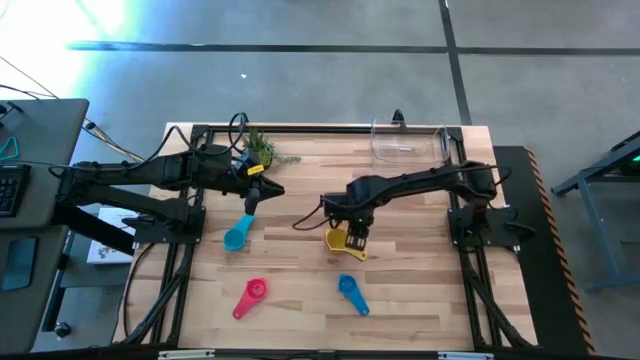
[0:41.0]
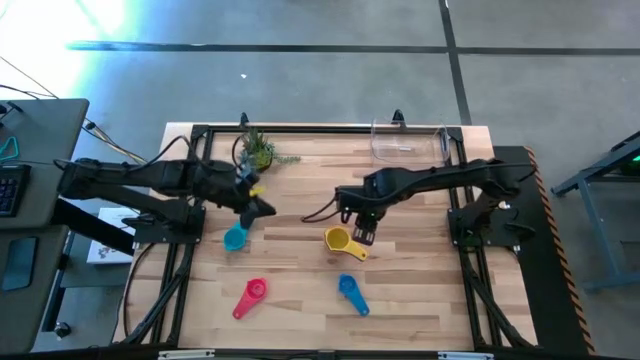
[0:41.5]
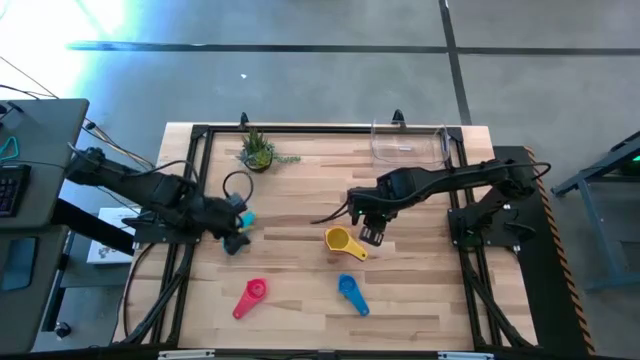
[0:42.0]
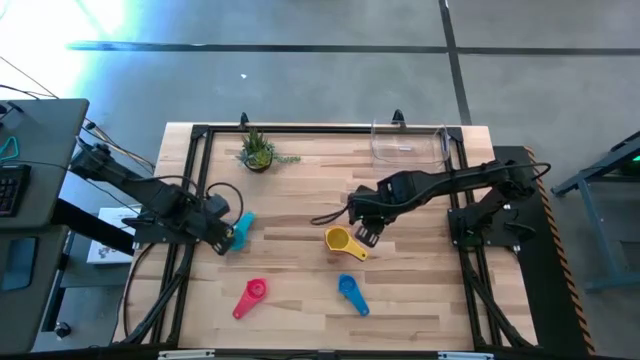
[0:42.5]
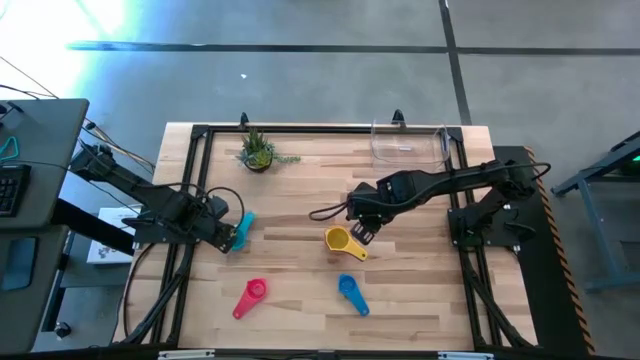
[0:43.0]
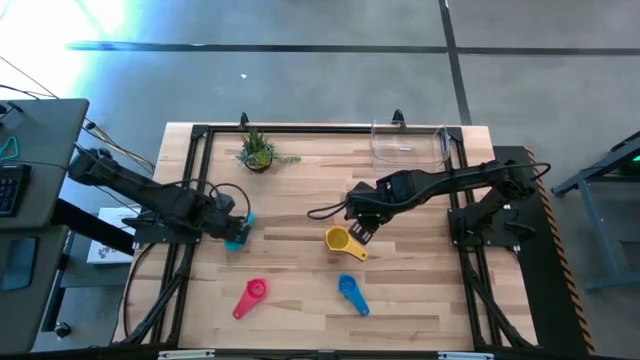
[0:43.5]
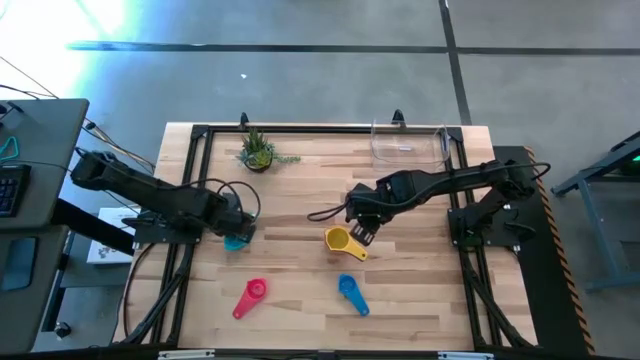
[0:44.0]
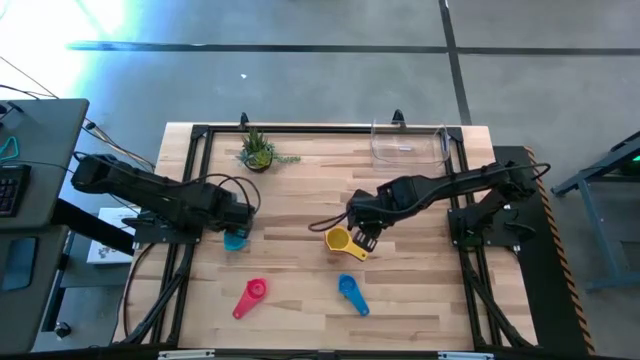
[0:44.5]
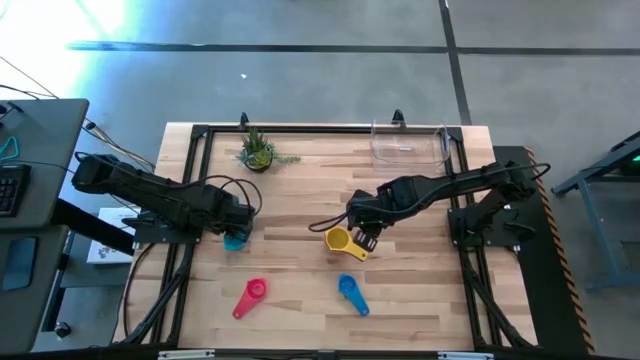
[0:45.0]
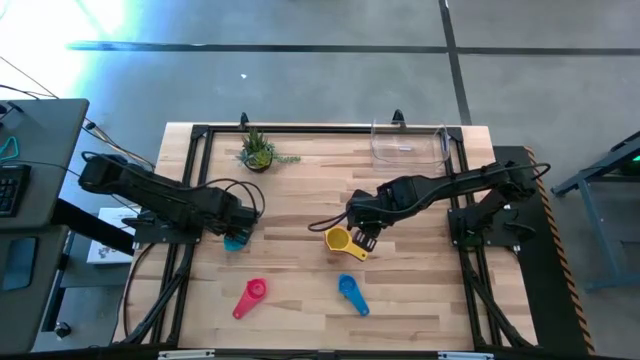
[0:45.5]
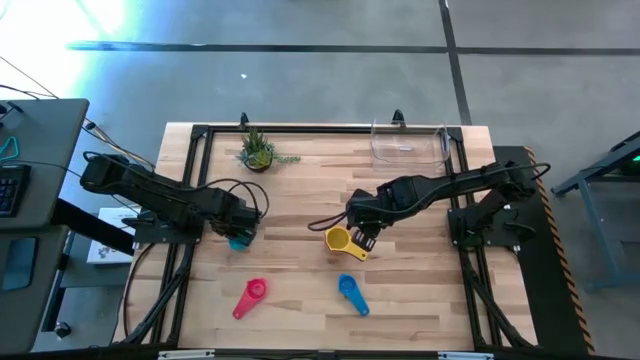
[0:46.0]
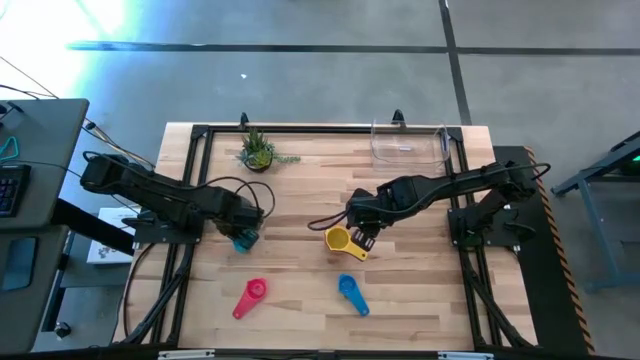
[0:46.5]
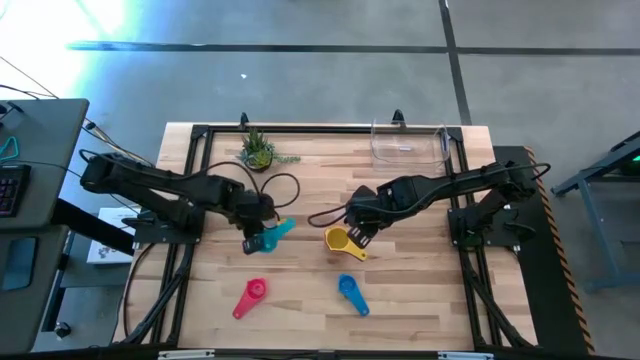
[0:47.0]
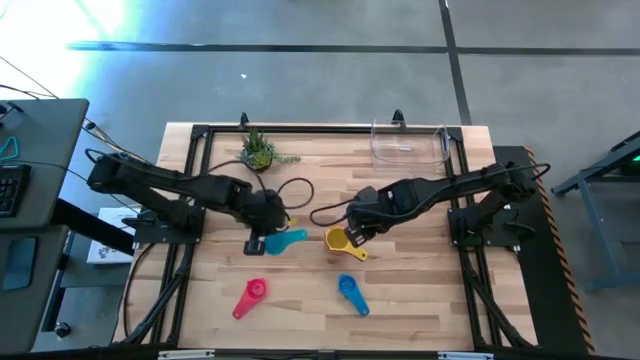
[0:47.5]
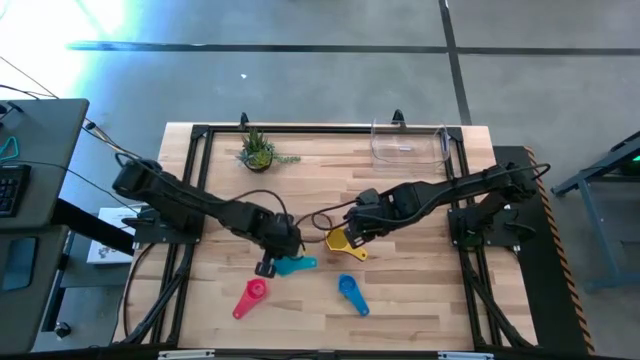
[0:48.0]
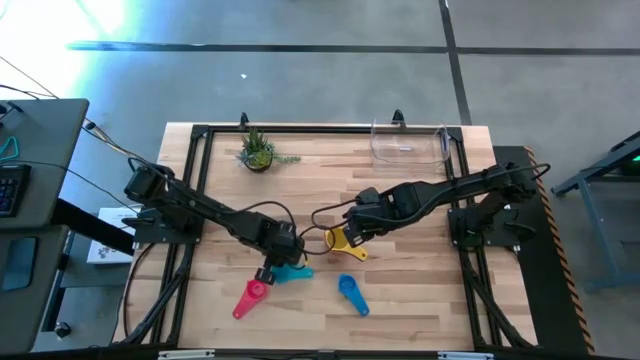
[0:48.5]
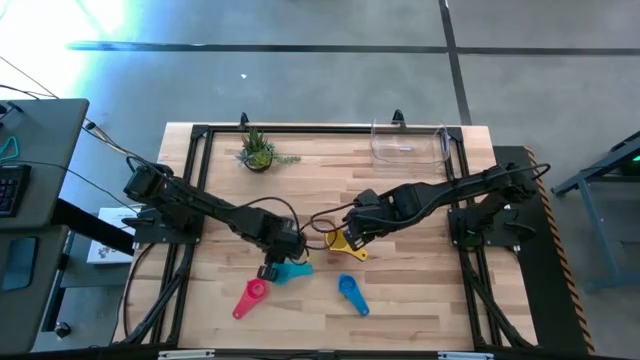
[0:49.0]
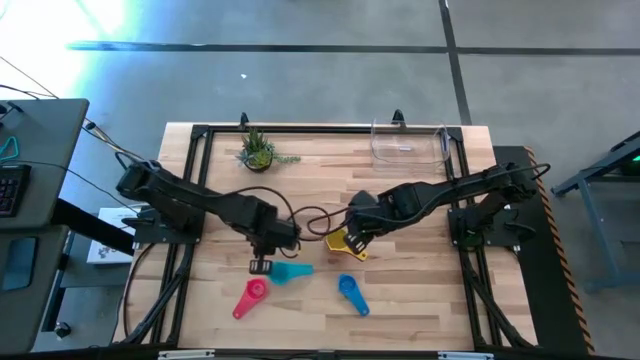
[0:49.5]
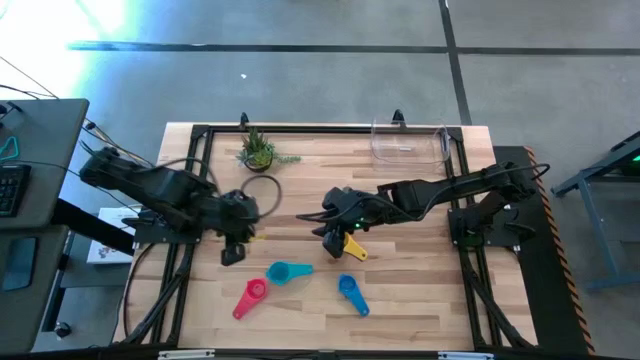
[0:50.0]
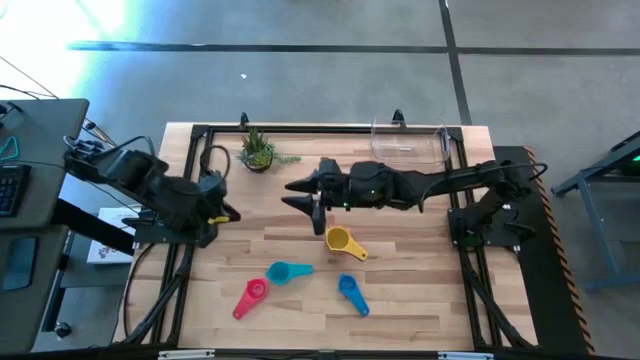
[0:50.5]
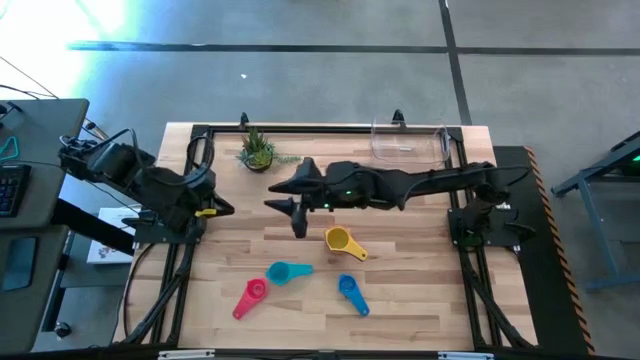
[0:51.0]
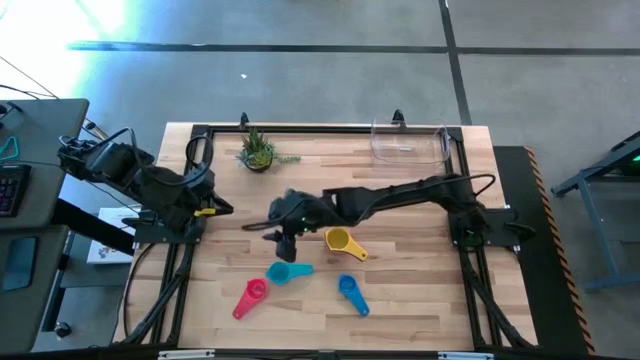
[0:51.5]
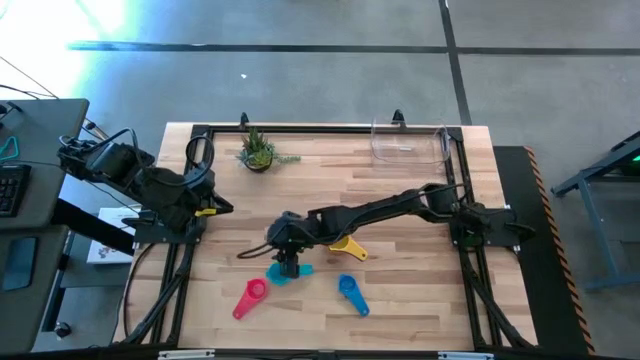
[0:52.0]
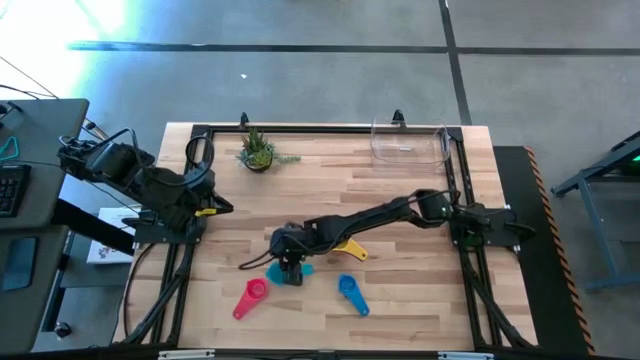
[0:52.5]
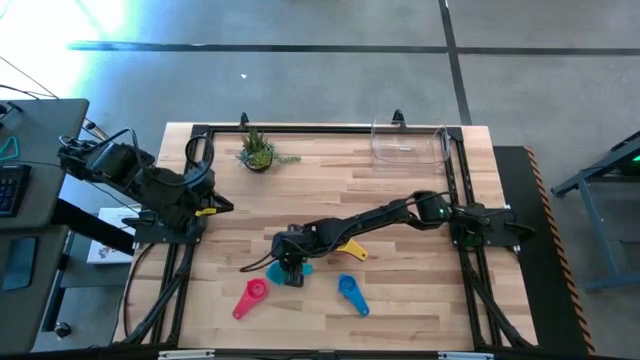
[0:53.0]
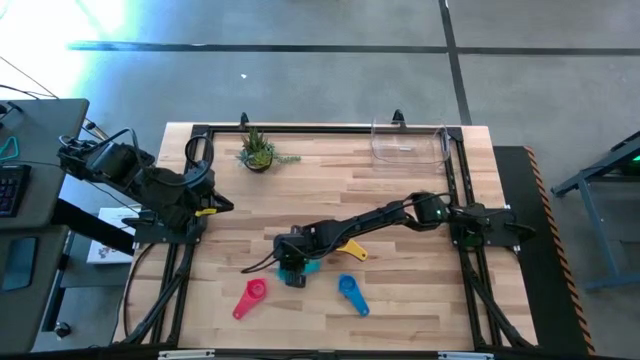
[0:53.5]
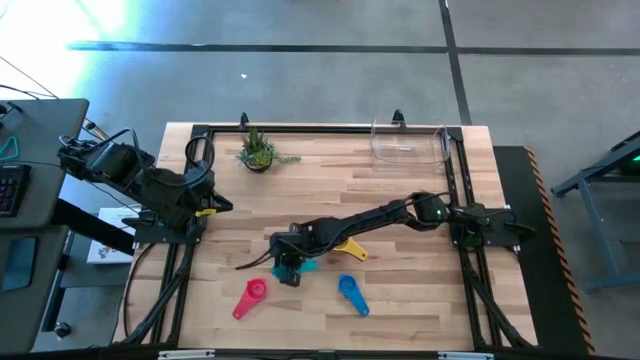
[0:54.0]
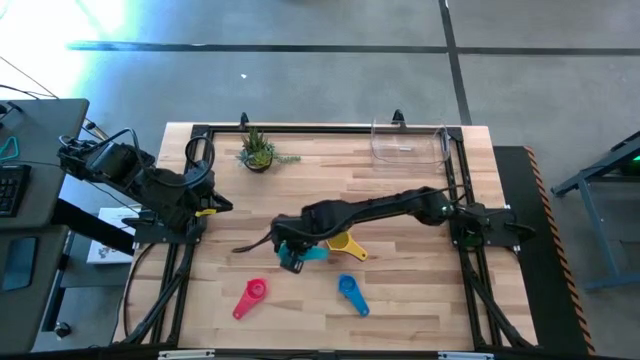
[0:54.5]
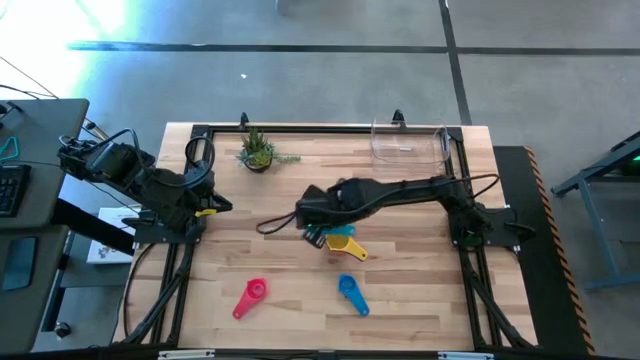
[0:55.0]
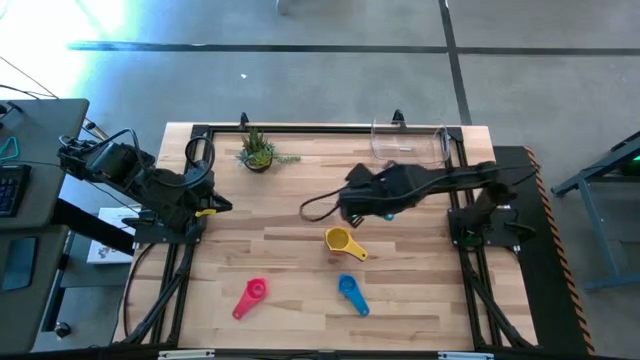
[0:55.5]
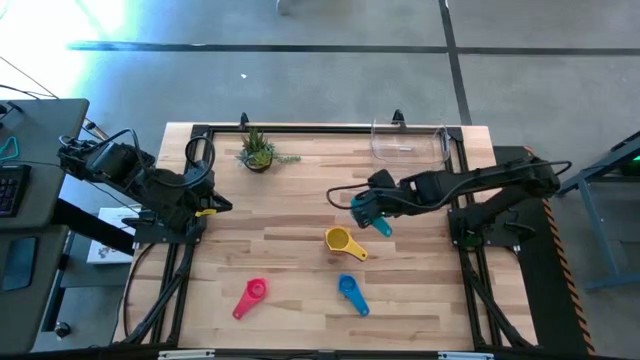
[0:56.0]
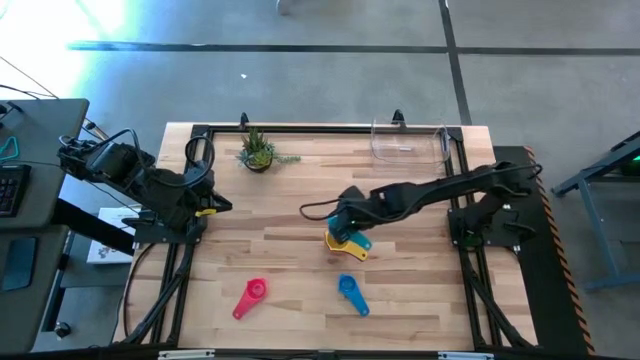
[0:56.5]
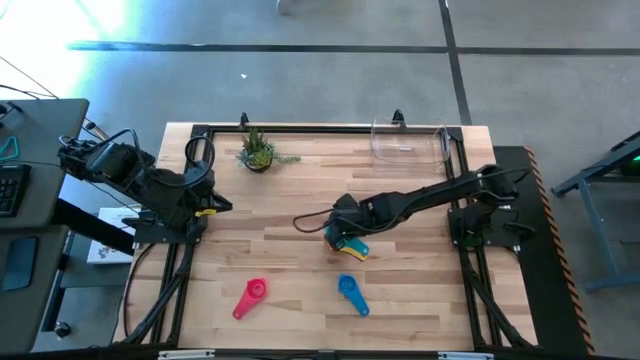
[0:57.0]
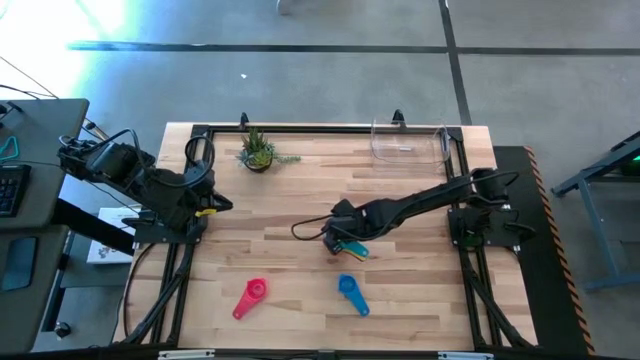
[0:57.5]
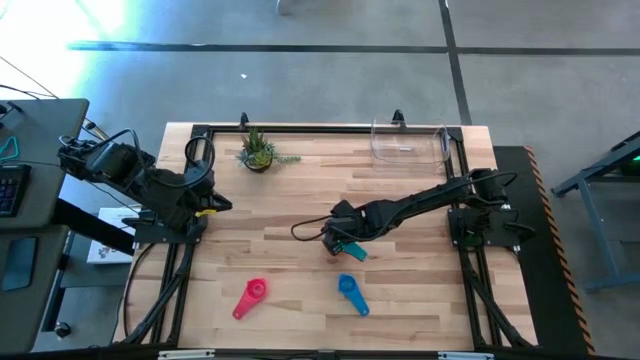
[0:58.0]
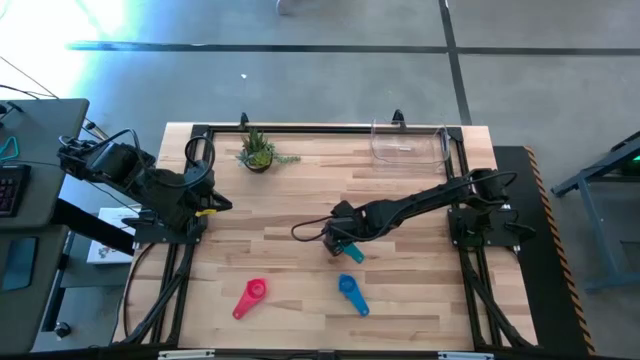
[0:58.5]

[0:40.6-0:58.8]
Task: Nest measuring cups in basket
Stack the light blue measuring cup on top of the yellow measuring cup

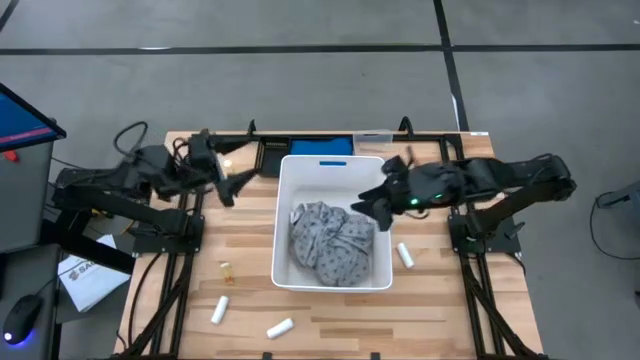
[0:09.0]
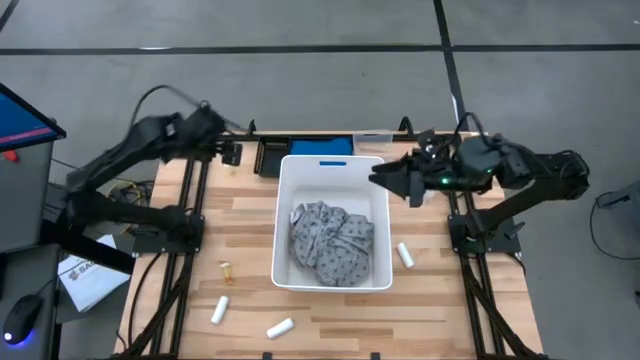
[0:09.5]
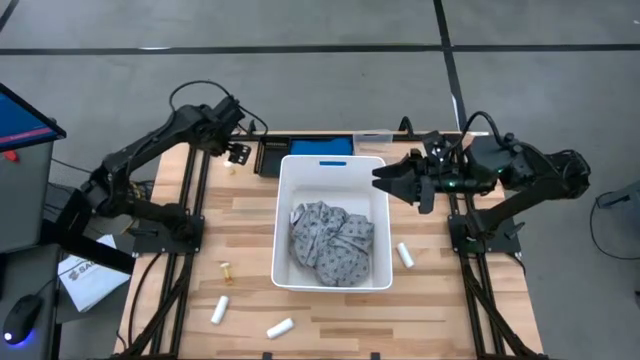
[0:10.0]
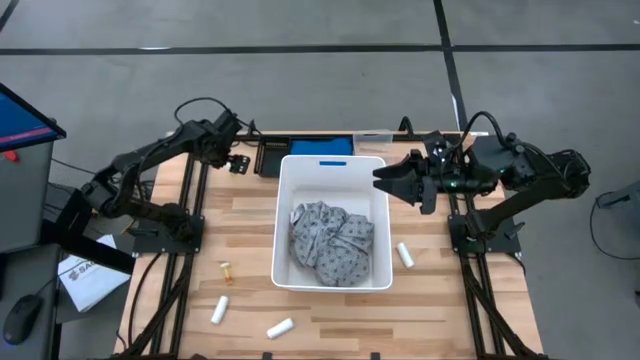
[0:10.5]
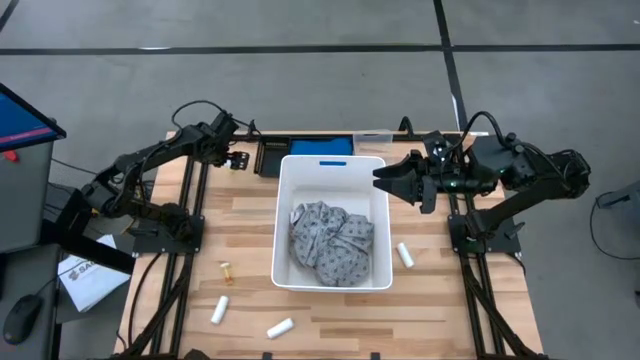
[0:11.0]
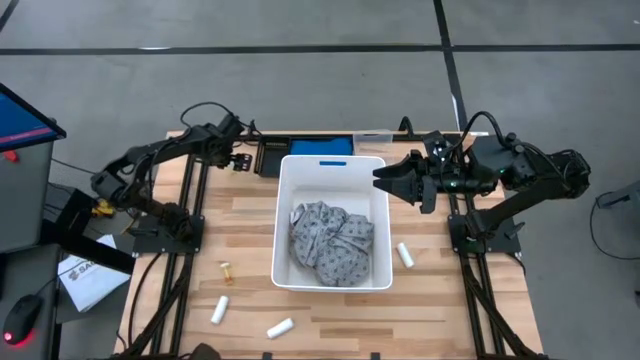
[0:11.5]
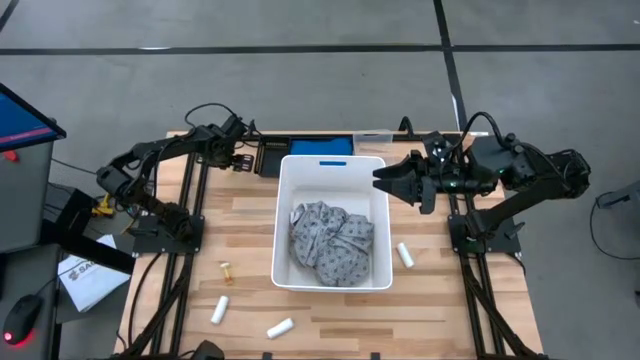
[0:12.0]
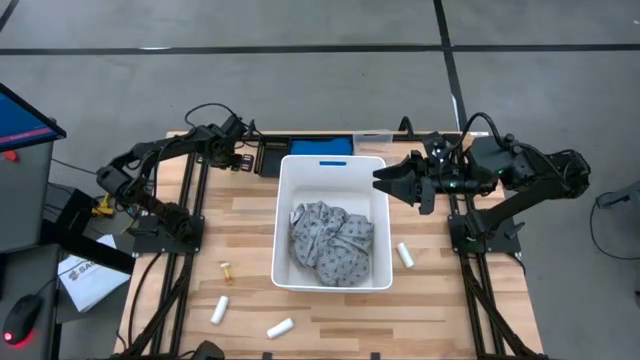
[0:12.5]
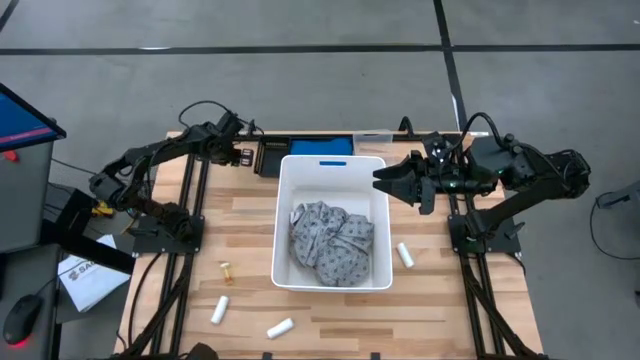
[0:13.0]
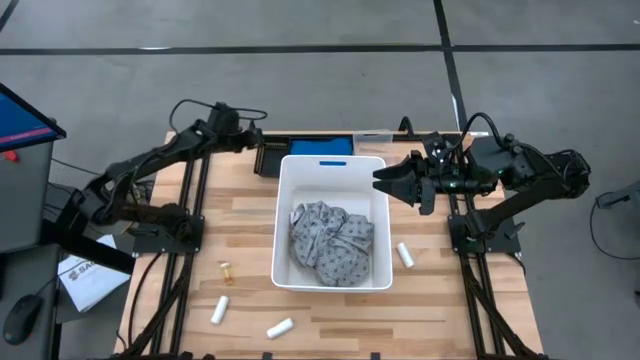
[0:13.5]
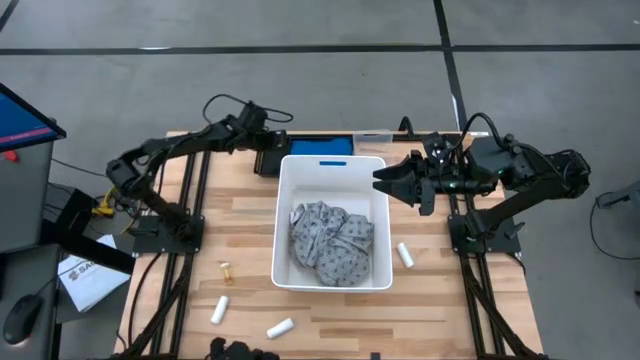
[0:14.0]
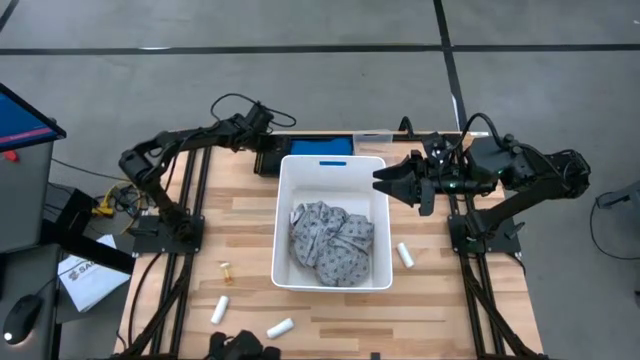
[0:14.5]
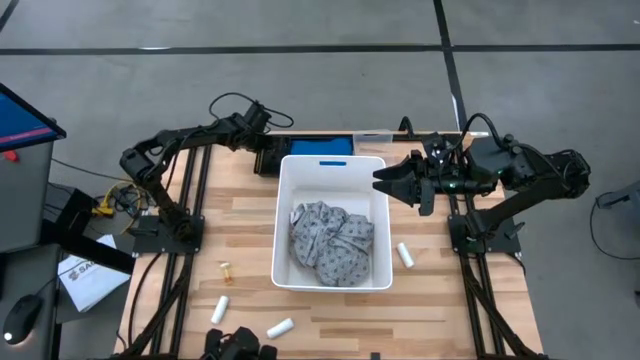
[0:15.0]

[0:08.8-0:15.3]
Task: Pick & place medical supplies in basket/bin
Put the top yellow pill bottle into the left black bin
